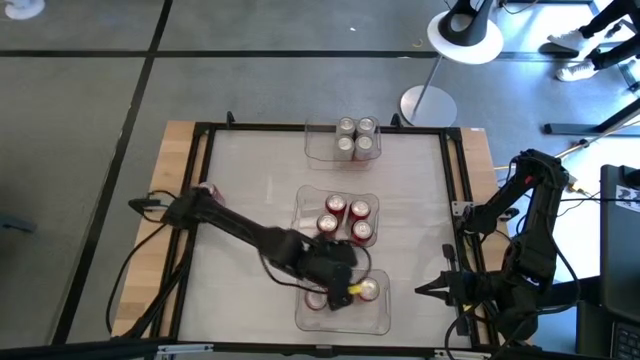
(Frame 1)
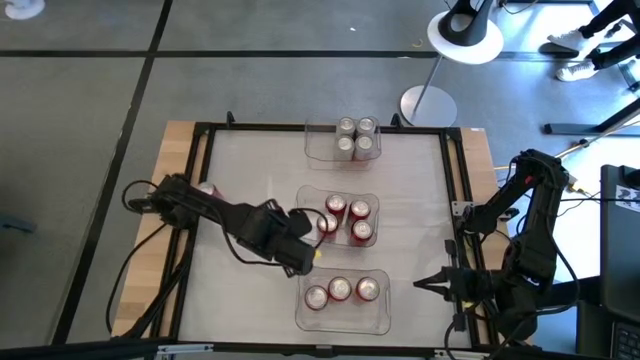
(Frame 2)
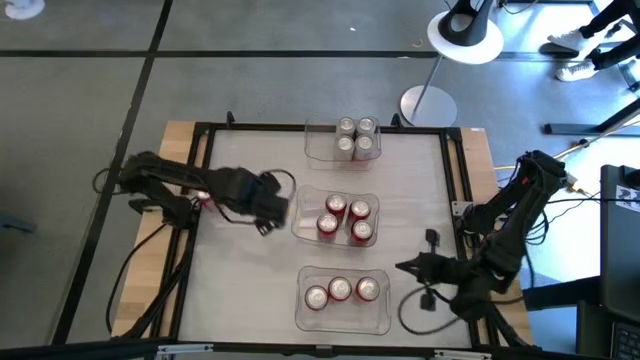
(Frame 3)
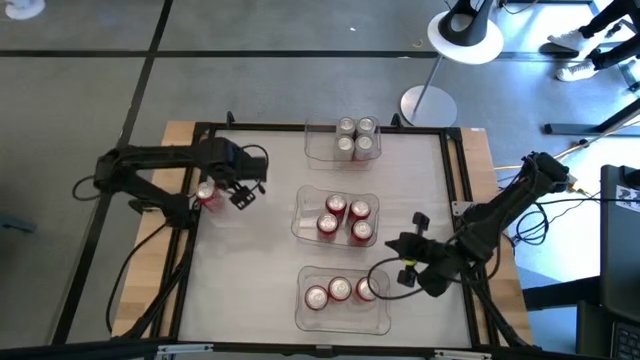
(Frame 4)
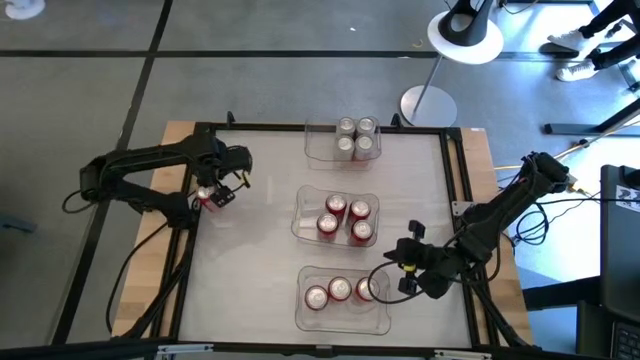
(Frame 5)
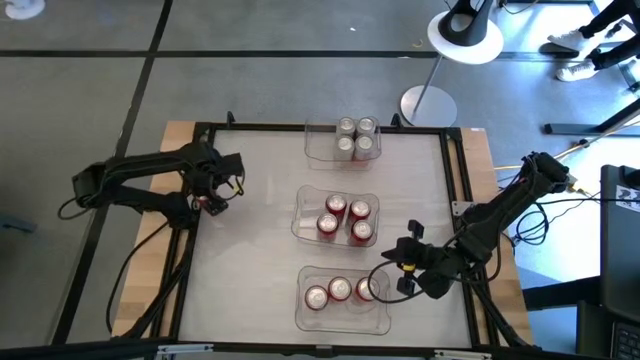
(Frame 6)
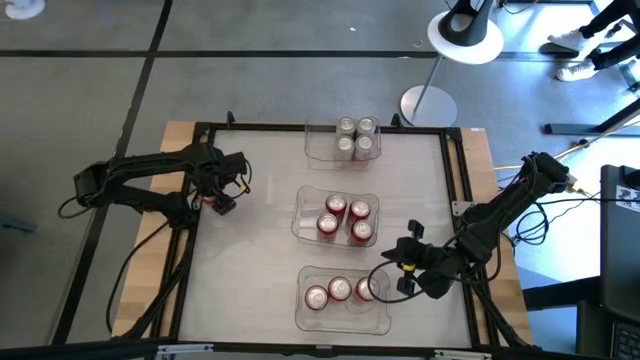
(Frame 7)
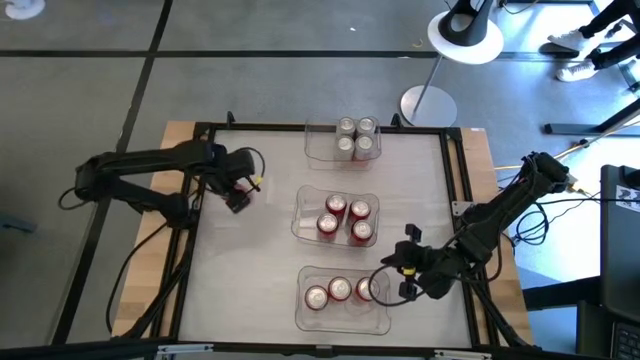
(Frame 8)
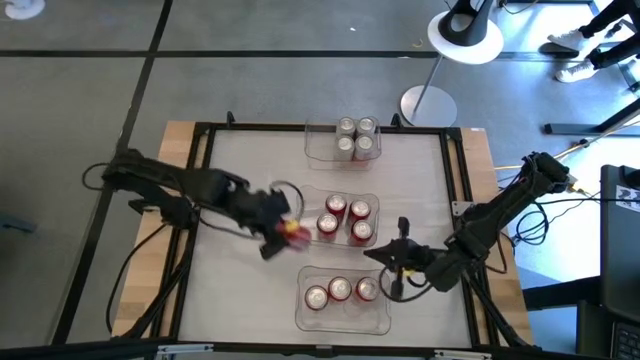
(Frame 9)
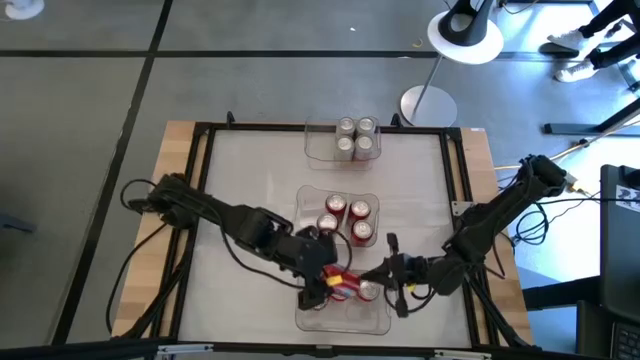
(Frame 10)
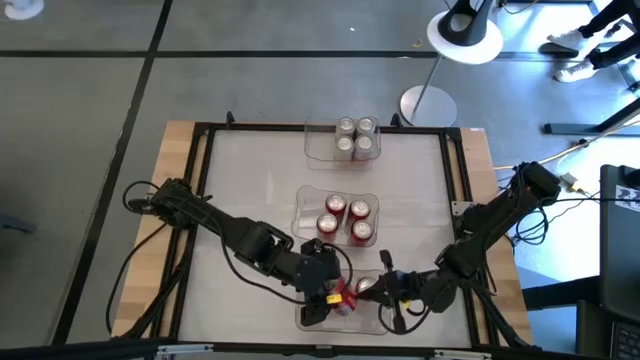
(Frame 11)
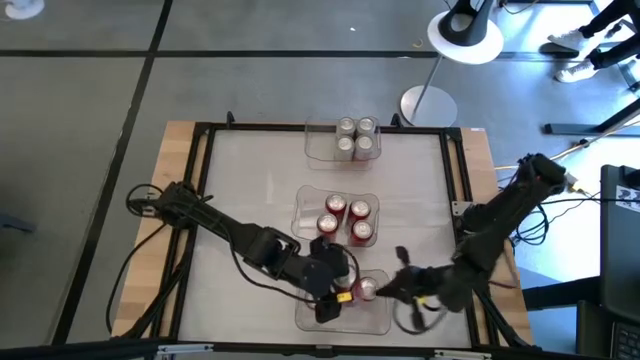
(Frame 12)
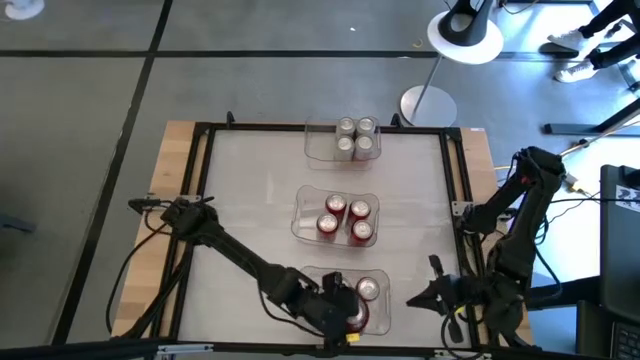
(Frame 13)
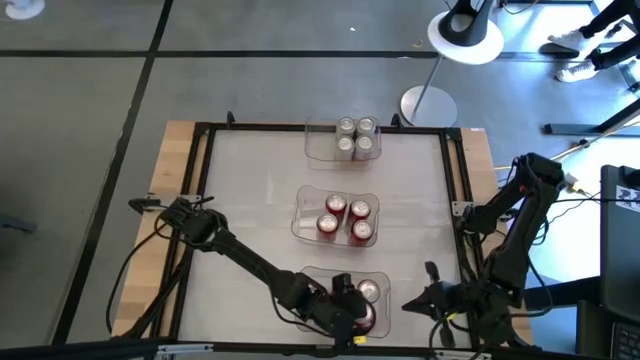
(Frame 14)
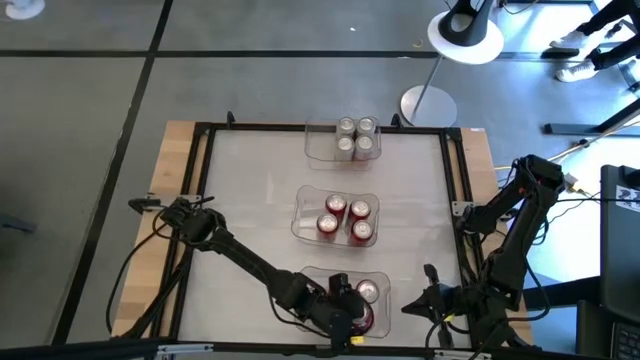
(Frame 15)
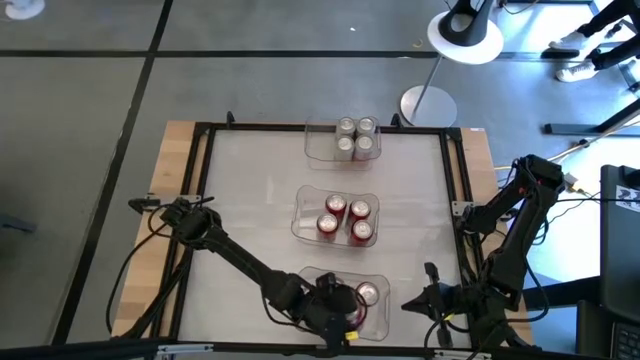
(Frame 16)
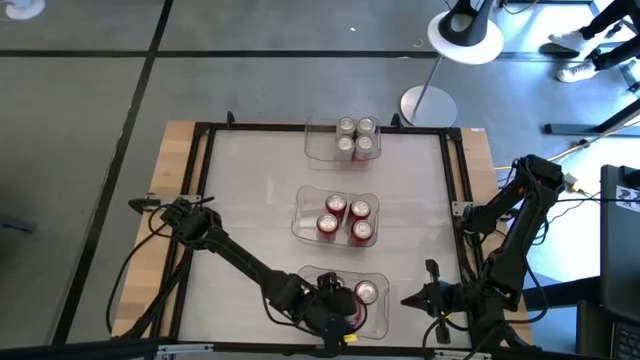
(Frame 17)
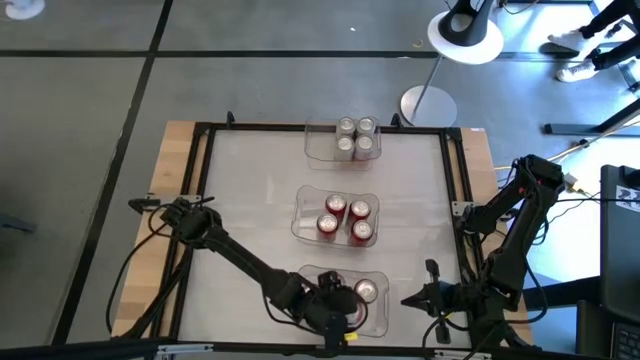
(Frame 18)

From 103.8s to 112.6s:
Task: Sort soda cans
Put the red soda can into the bottom transparent bin

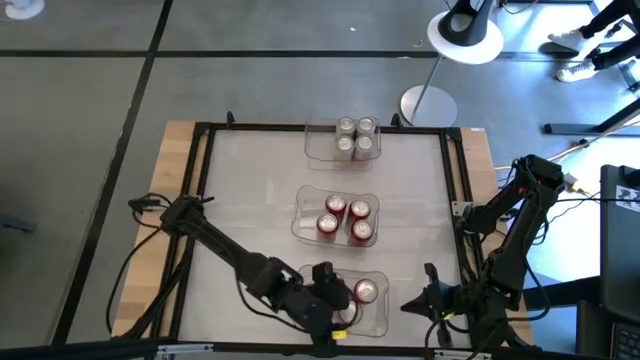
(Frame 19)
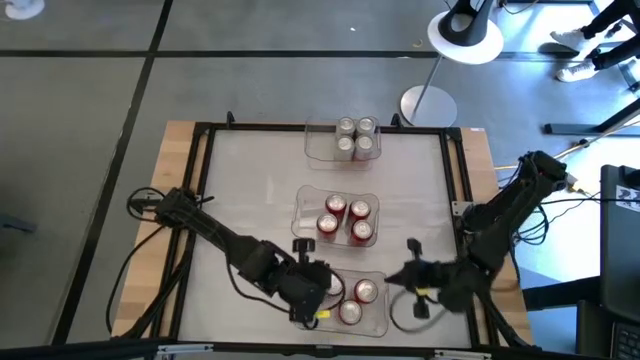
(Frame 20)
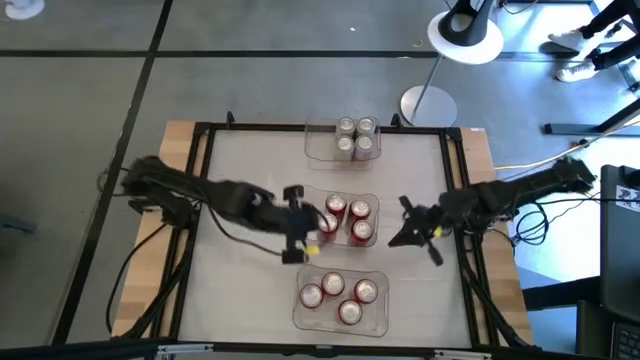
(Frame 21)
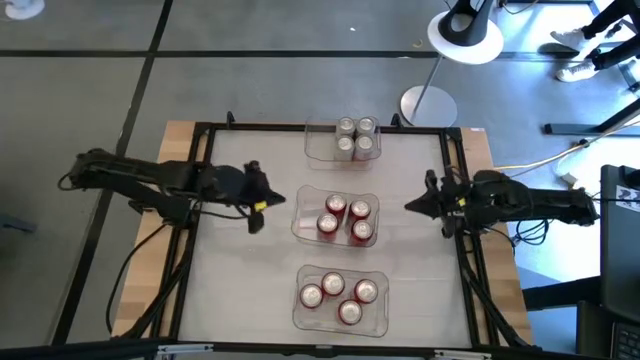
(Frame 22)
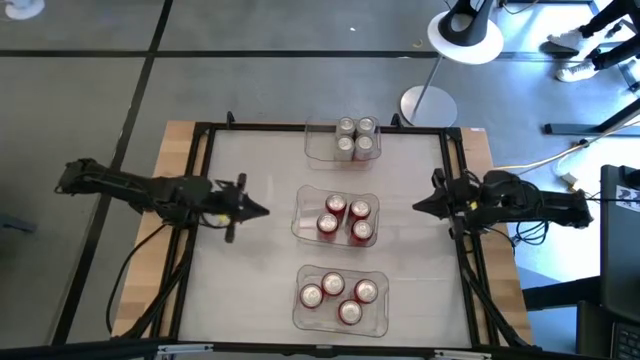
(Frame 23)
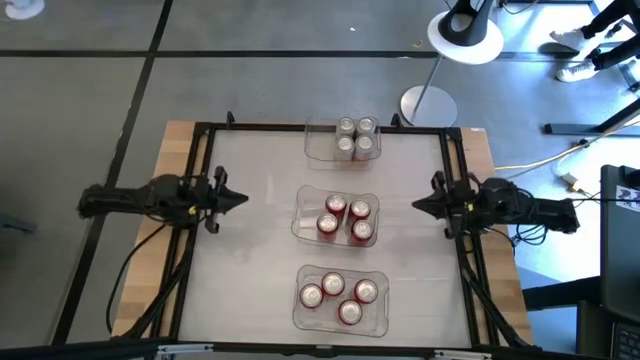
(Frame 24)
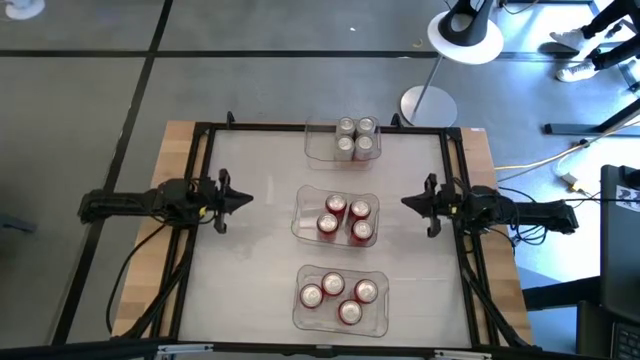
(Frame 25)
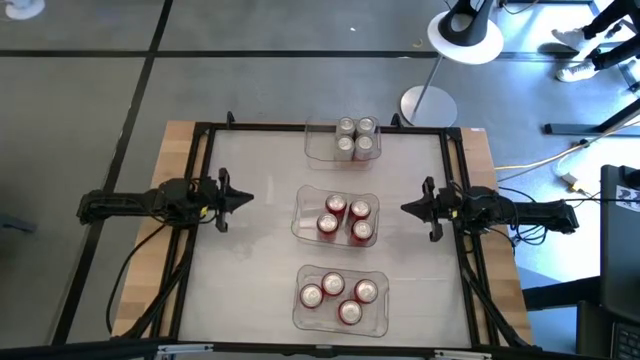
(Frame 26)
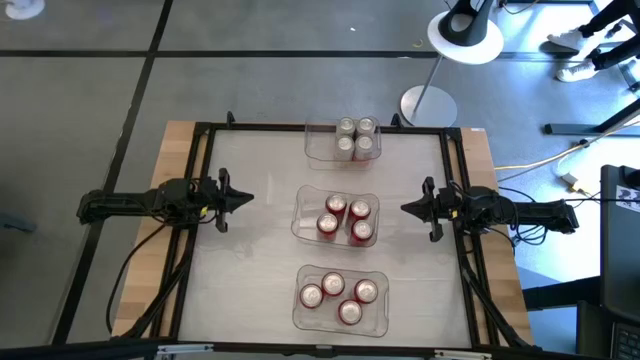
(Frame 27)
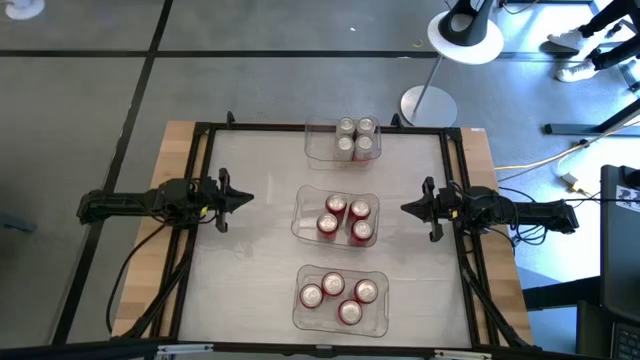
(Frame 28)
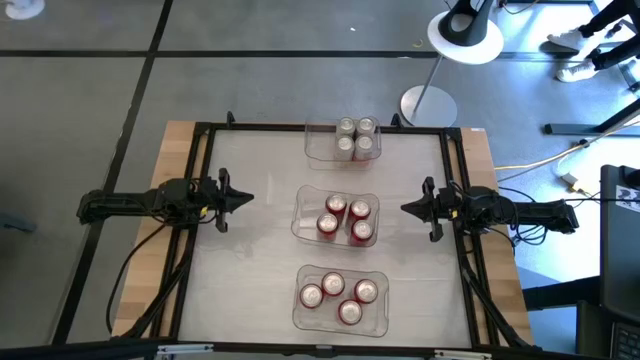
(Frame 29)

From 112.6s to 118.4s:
Return to Home Position

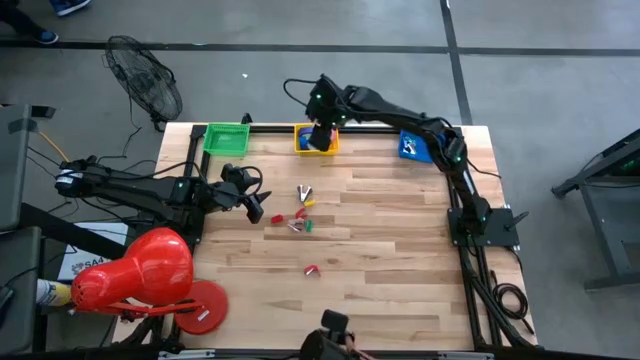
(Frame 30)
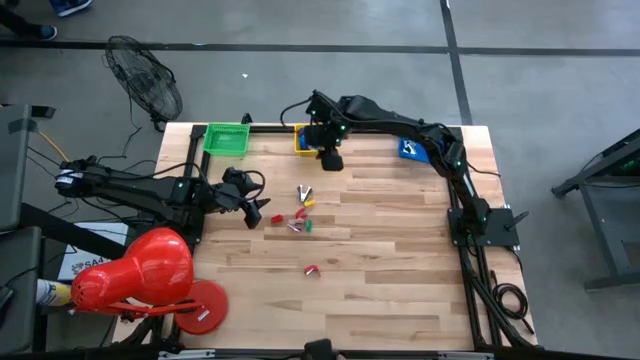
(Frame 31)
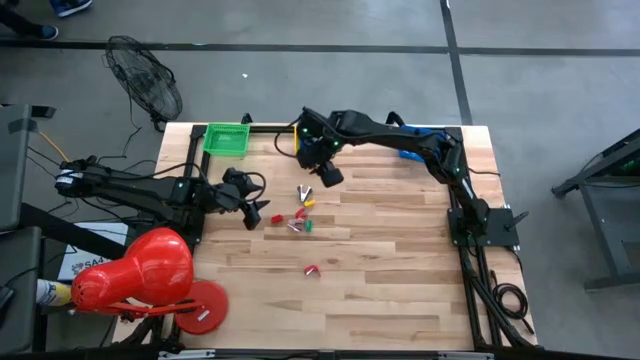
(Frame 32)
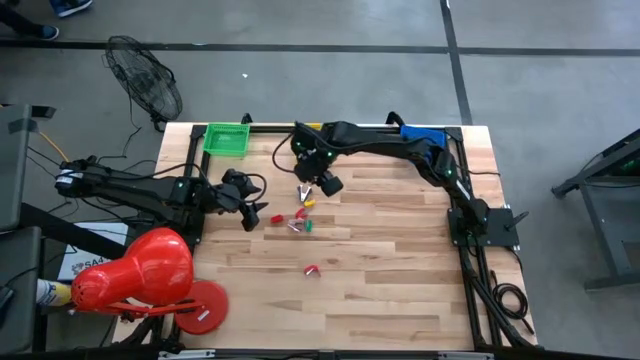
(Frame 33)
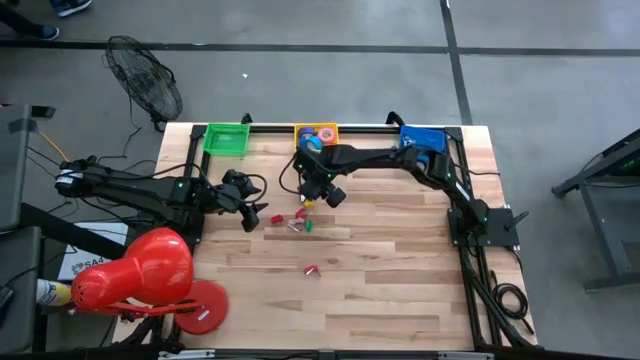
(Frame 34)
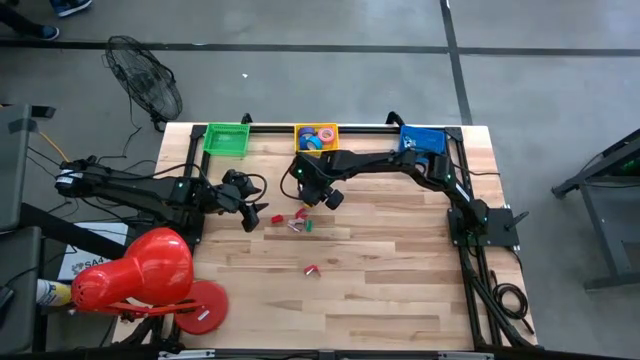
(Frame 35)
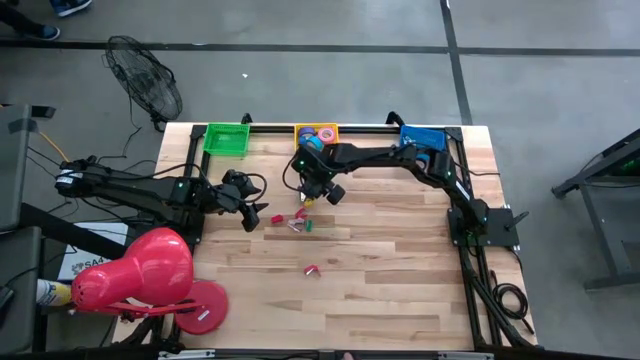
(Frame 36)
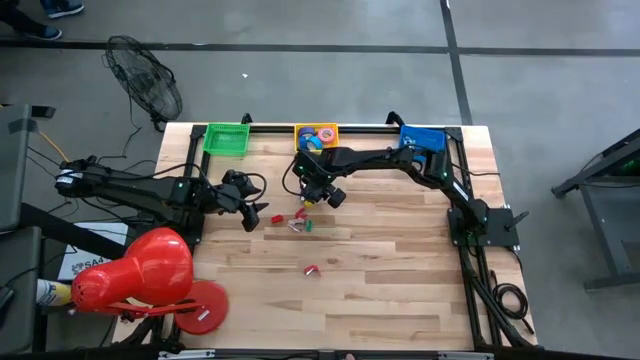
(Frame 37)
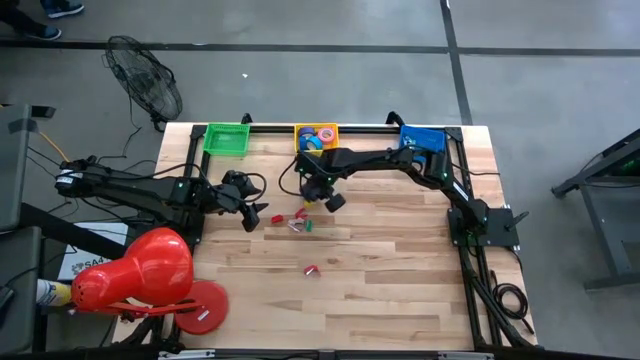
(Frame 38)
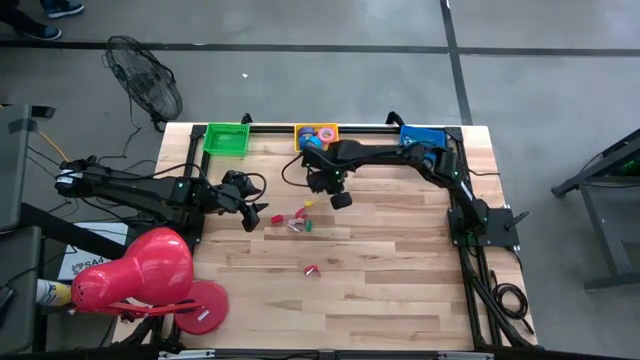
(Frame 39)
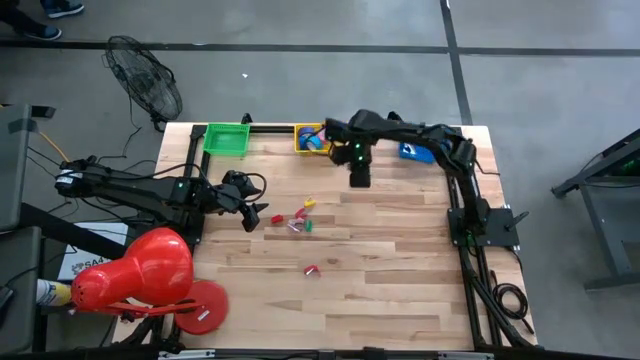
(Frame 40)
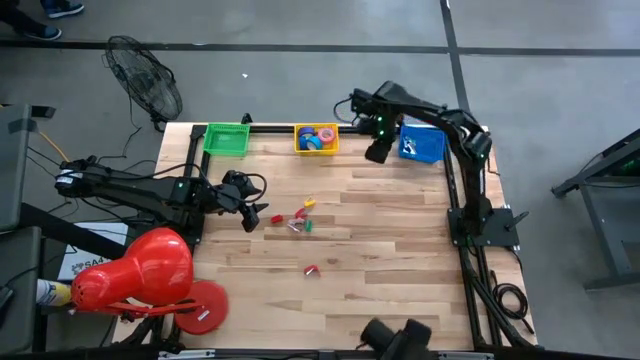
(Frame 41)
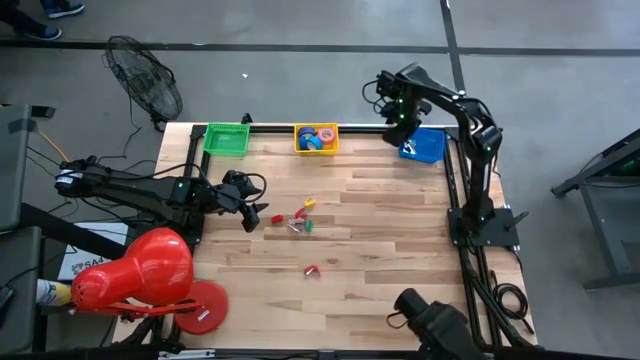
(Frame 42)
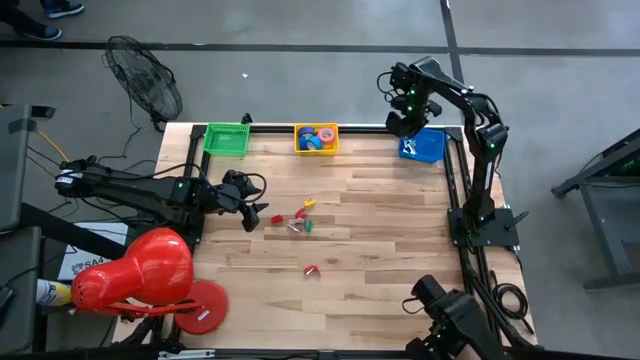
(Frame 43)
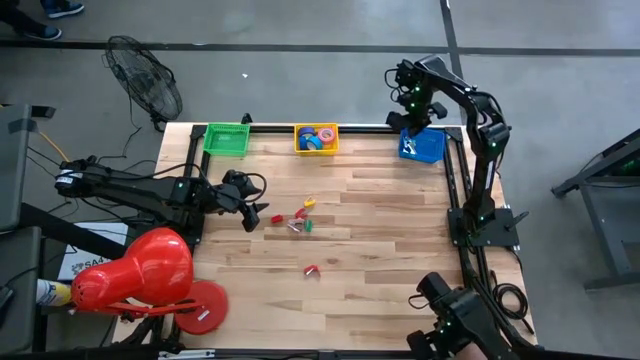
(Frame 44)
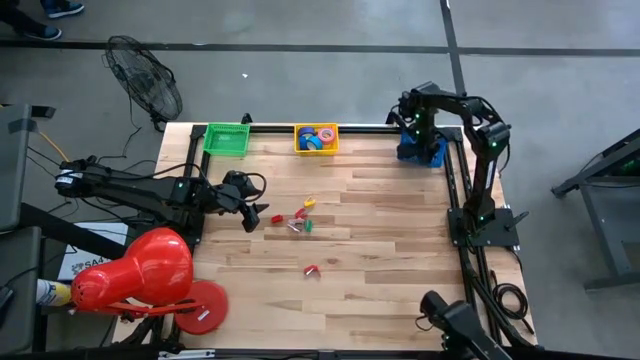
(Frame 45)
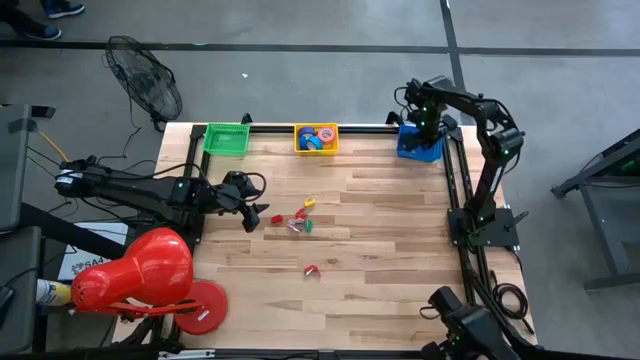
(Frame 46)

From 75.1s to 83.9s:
Task: Pick and place Stapler, Stapler remover, tape
Put the black staple remover into the blue bin
